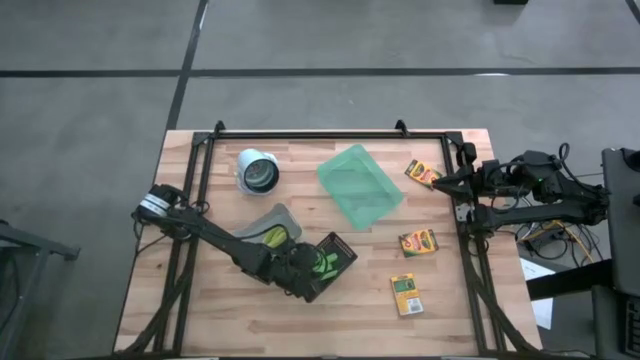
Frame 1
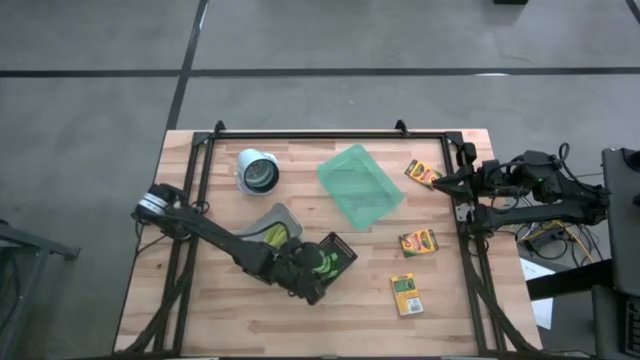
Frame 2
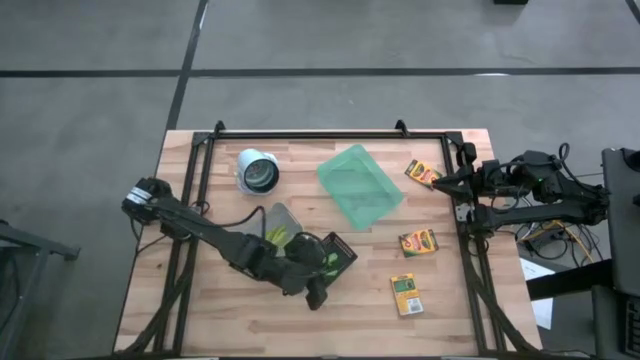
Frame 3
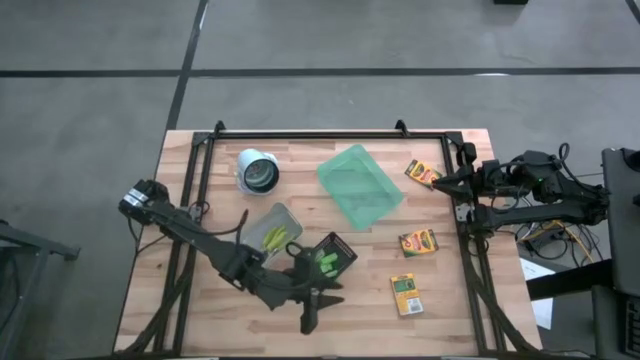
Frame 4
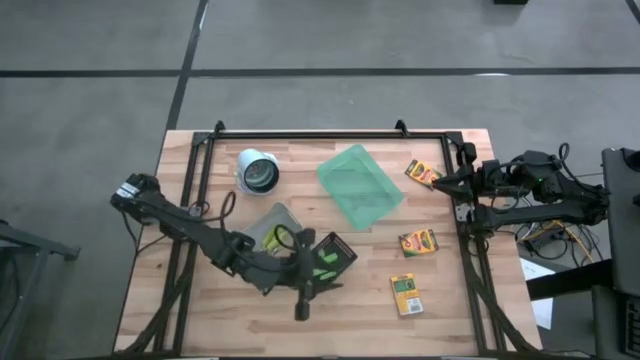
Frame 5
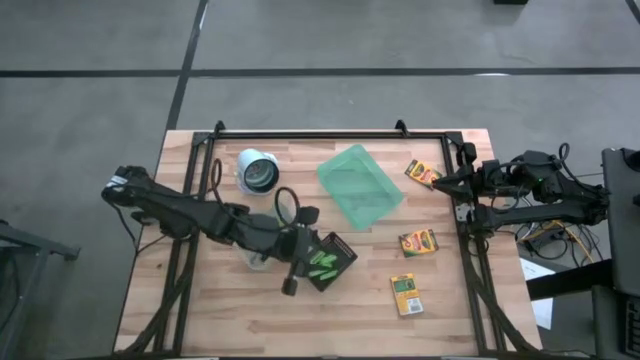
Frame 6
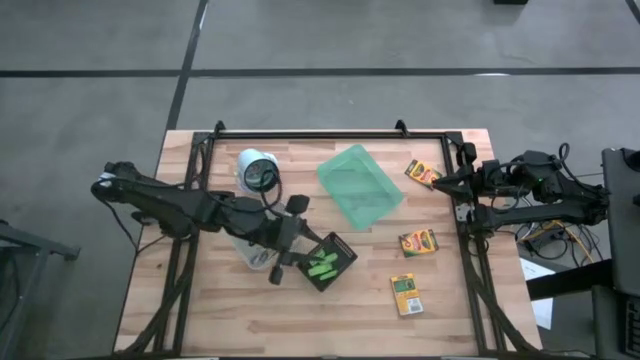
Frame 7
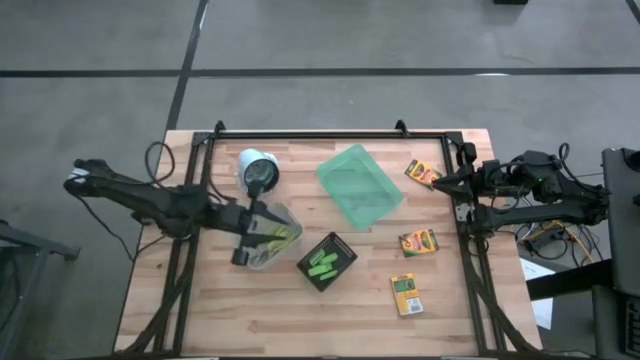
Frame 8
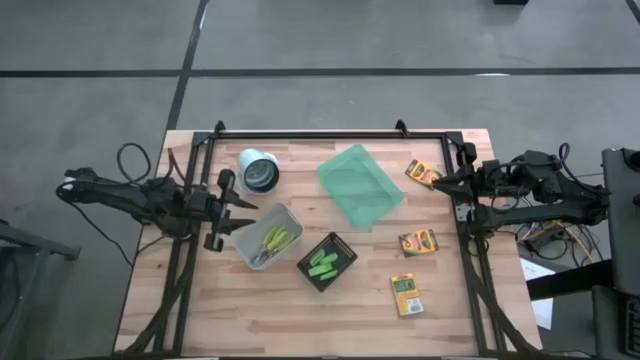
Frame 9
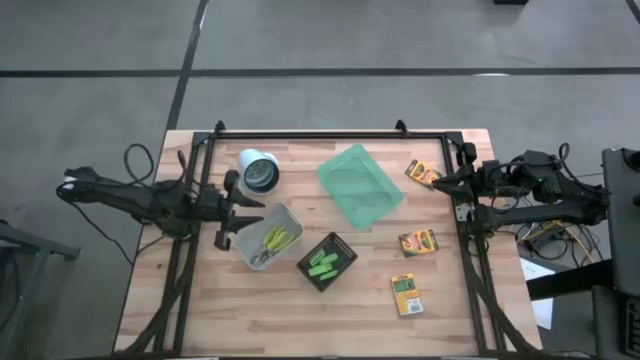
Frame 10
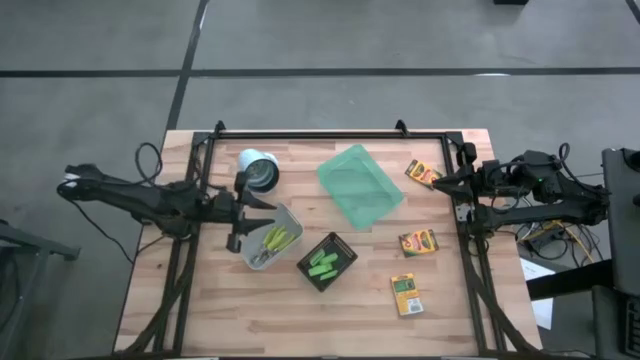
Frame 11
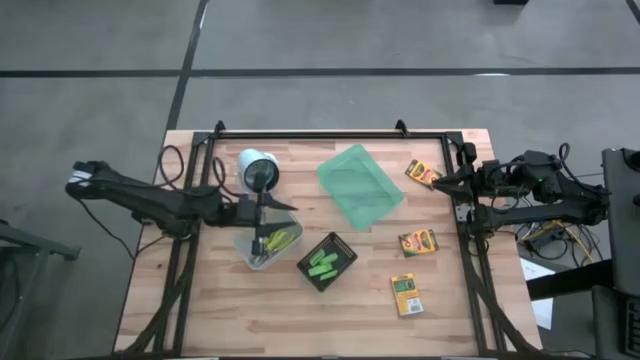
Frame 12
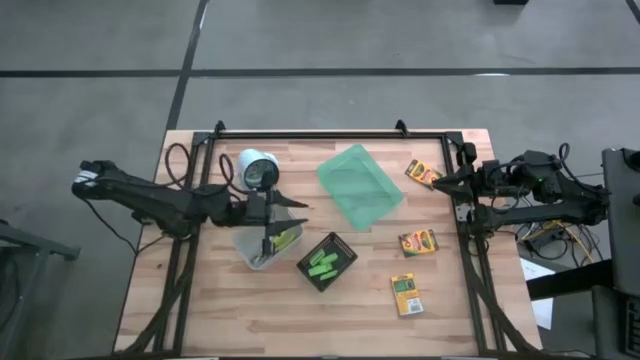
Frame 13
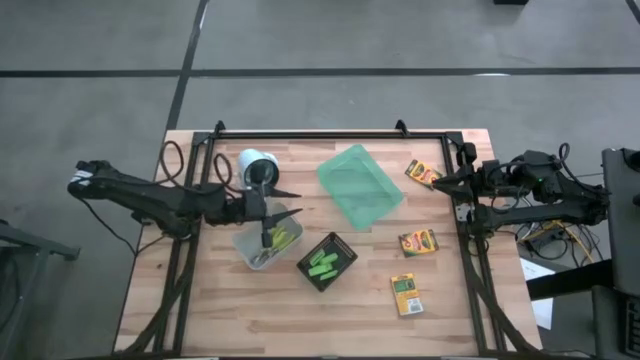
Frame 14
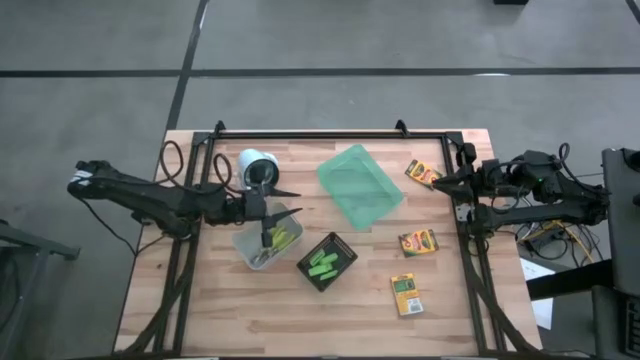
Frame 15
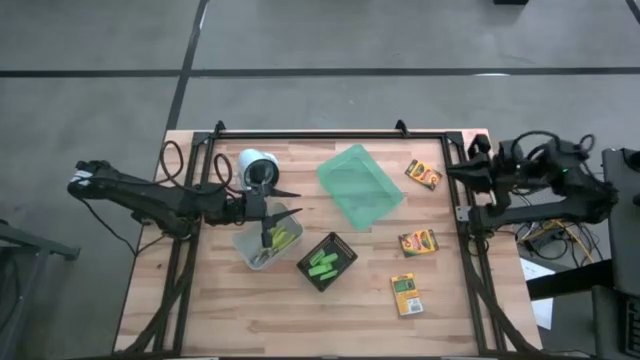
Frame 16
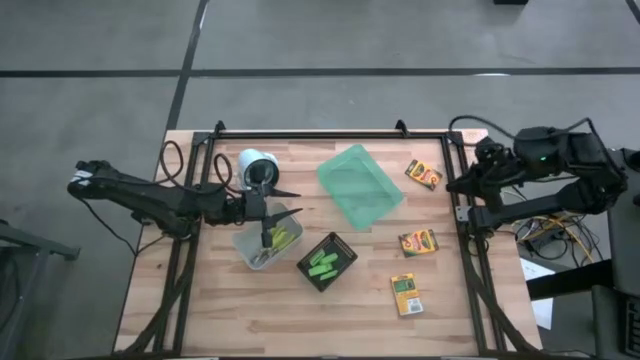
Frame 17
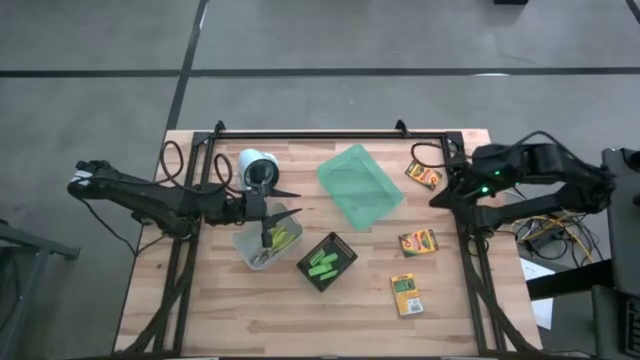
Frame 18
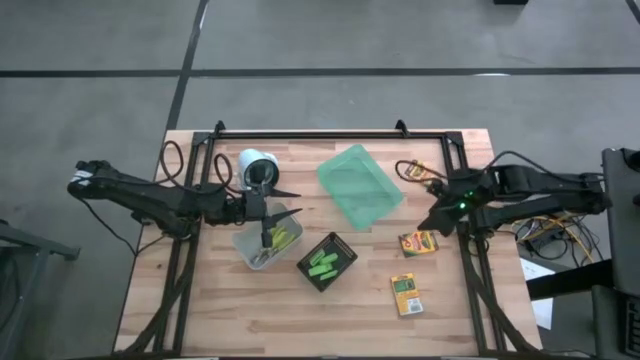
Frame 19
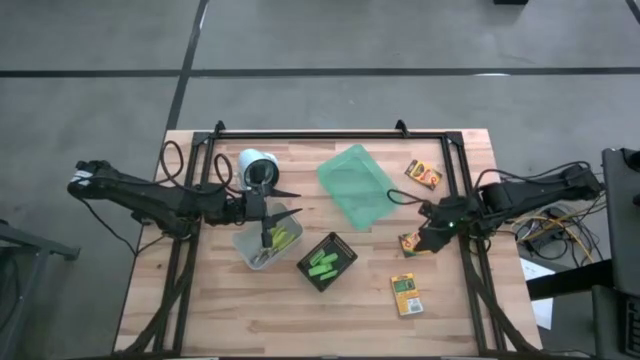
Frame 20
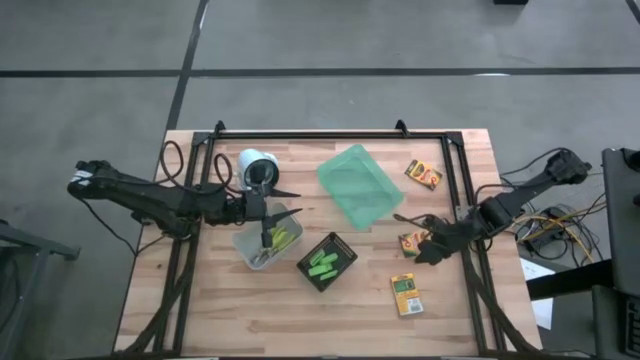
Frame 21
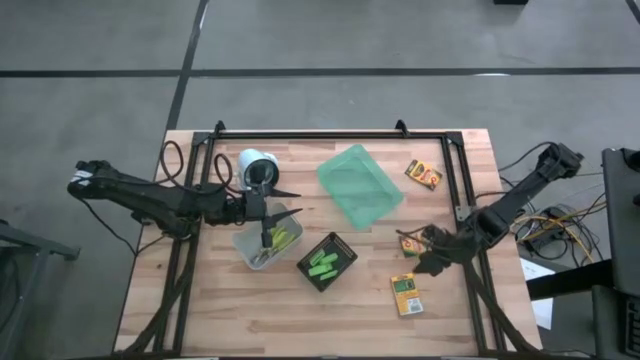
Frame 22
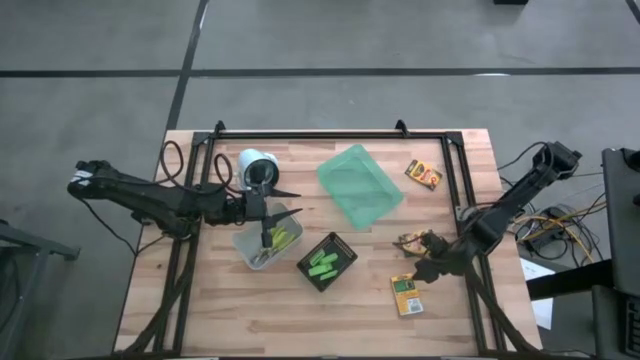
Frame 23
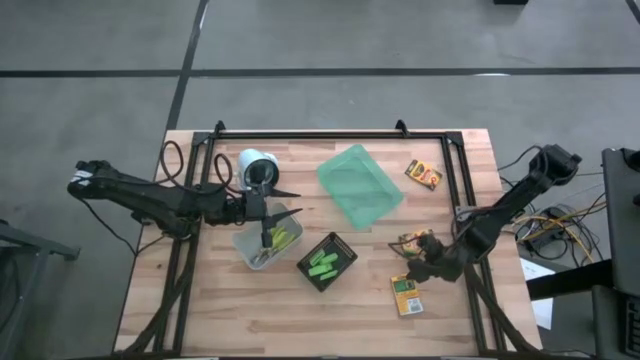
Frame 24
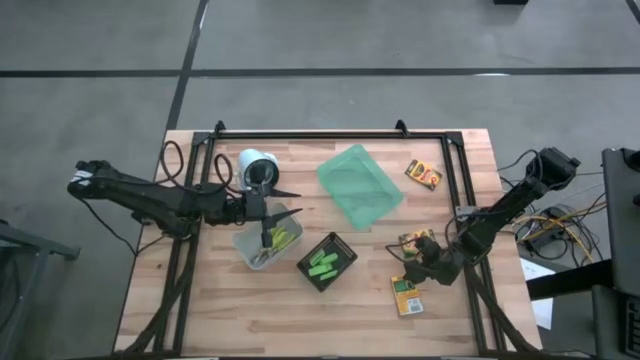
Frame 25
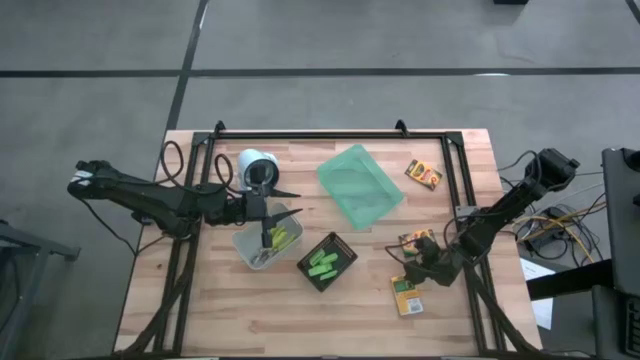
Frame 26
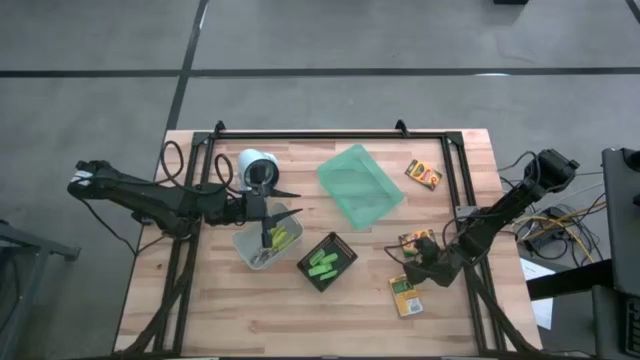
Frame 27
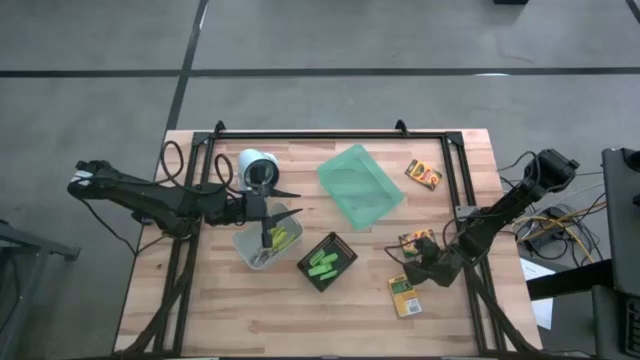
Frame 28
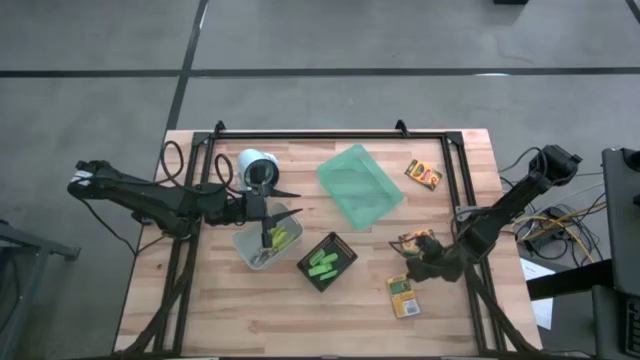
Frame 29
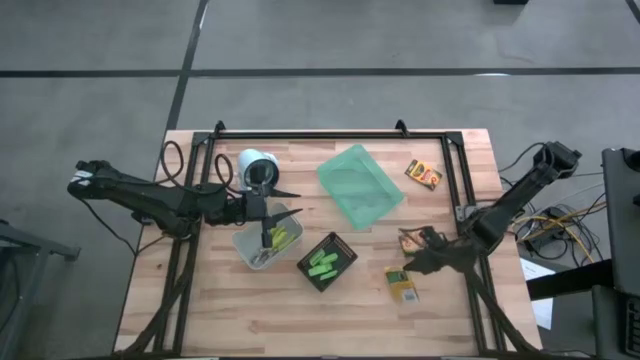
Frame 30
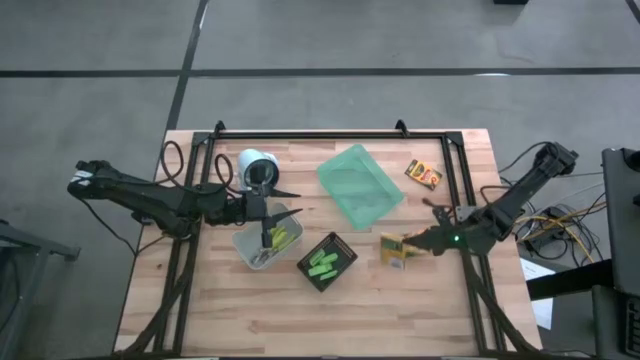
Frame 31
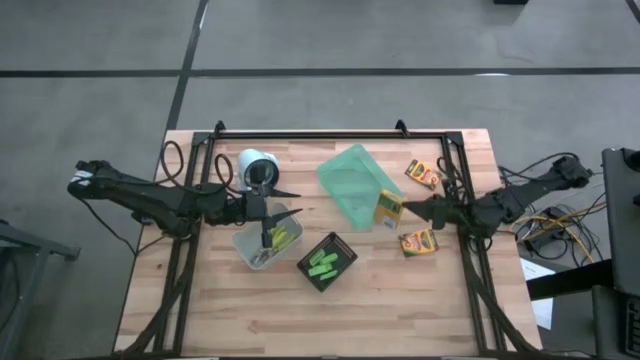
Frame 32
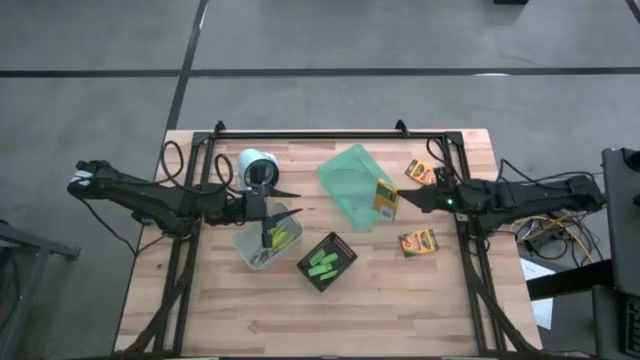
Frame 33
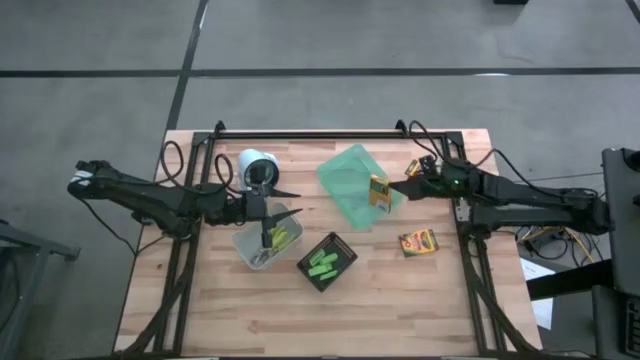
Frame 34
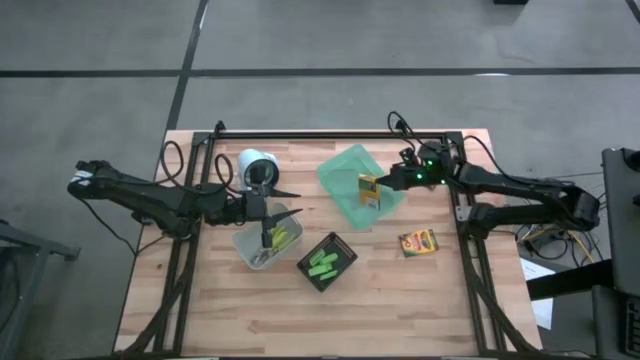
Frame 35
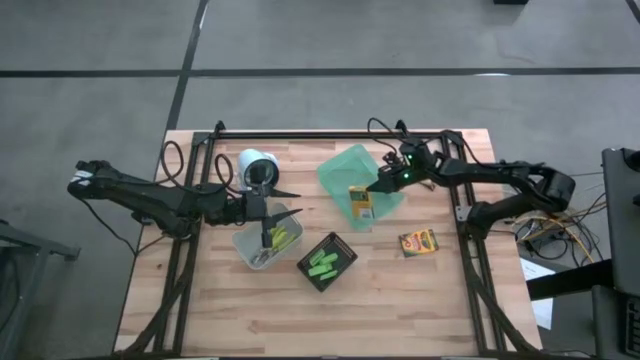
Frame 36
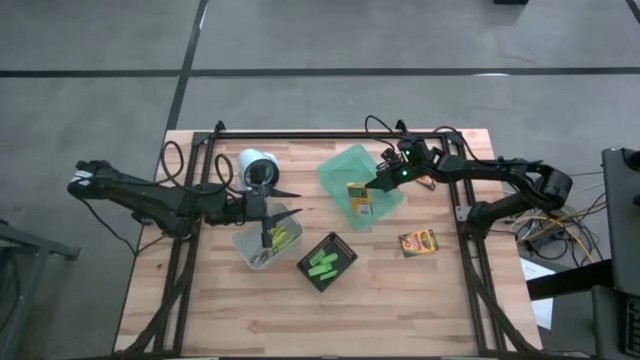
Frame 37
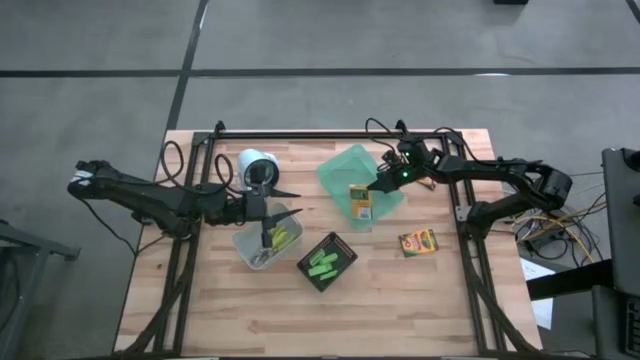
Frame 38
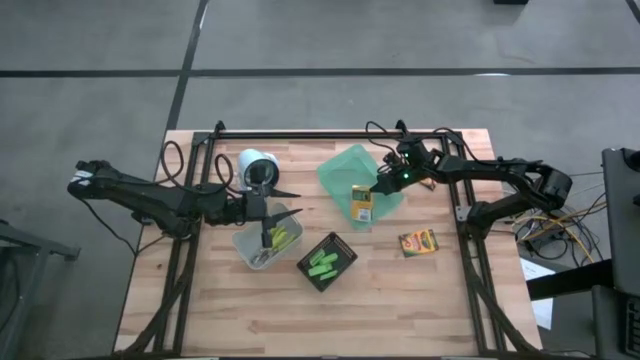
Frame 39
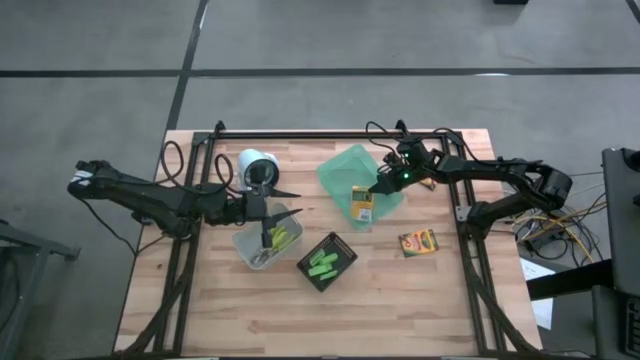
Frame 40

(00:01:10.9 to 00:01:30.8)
Task: Pick & Place School Supplies
Put the crayon box into the light green bin
